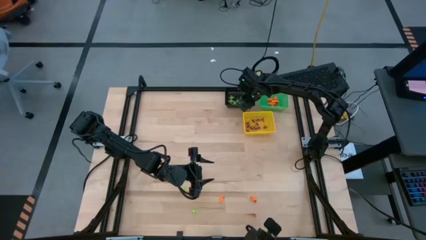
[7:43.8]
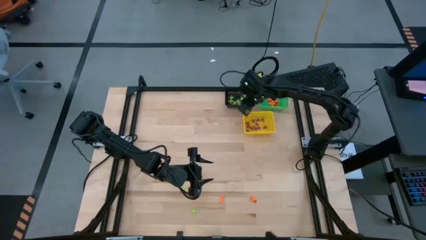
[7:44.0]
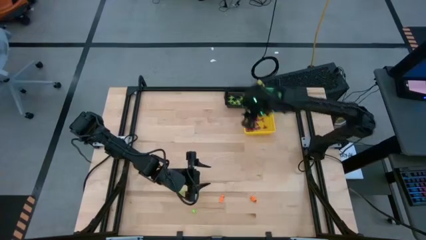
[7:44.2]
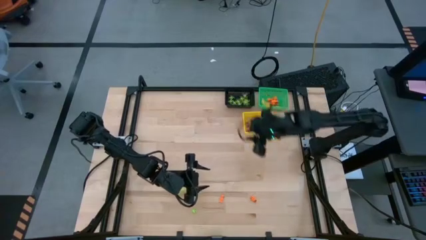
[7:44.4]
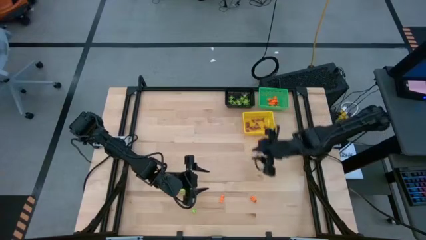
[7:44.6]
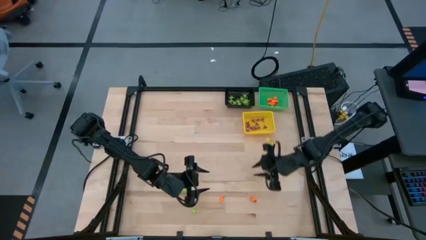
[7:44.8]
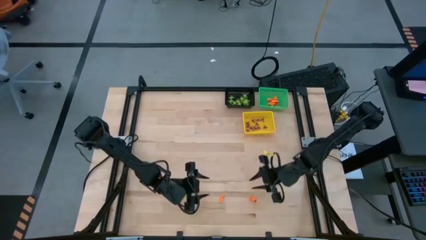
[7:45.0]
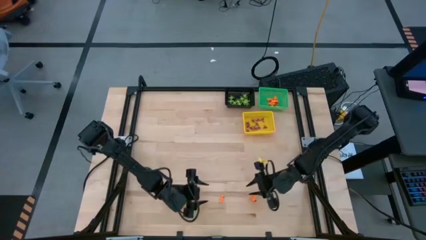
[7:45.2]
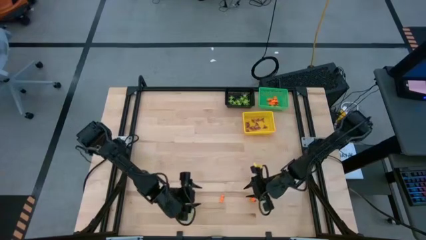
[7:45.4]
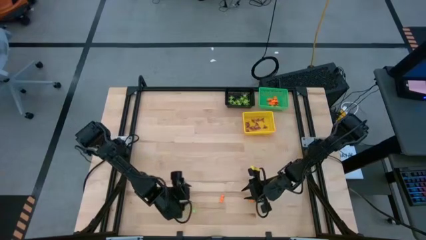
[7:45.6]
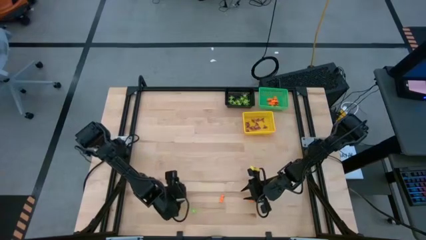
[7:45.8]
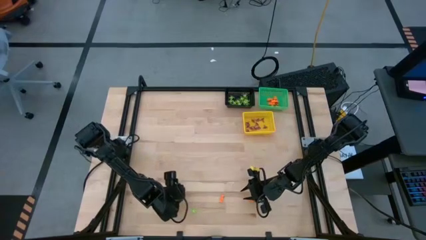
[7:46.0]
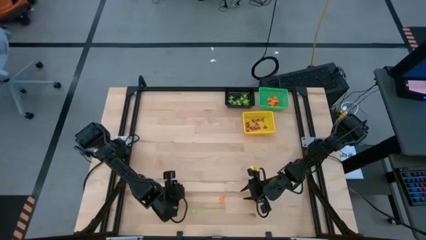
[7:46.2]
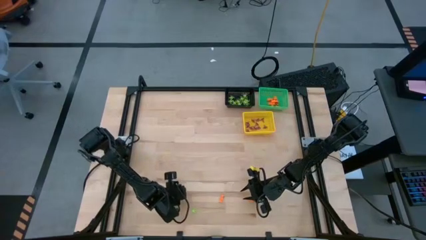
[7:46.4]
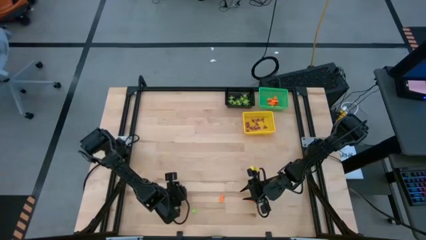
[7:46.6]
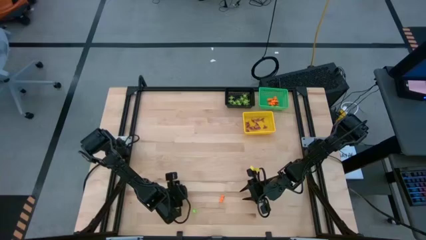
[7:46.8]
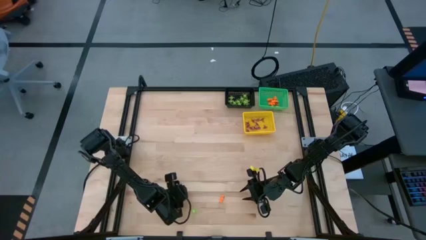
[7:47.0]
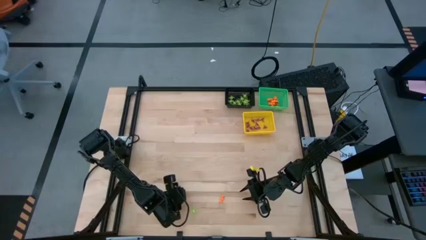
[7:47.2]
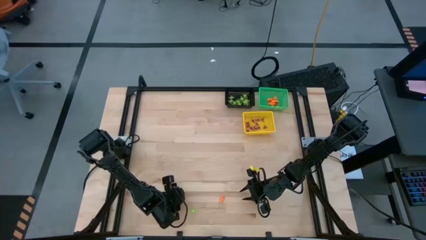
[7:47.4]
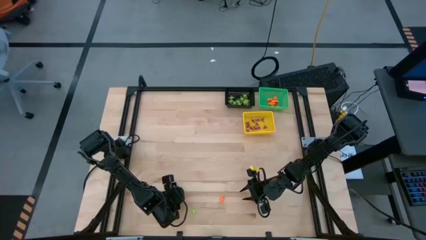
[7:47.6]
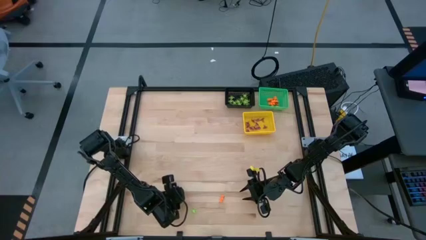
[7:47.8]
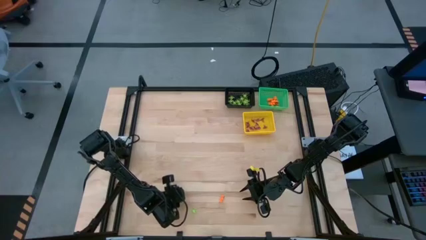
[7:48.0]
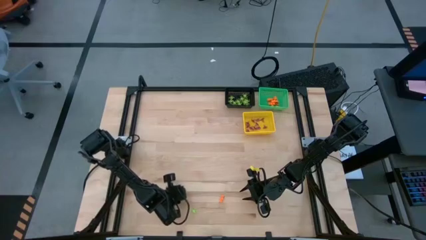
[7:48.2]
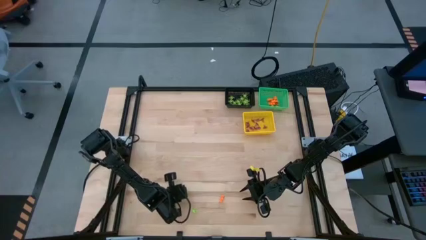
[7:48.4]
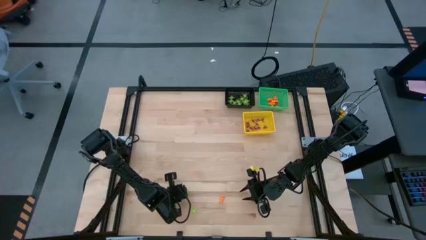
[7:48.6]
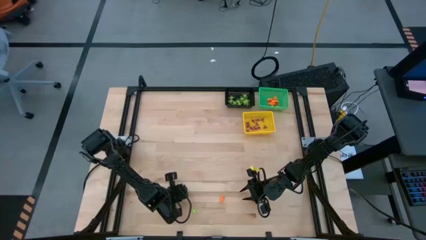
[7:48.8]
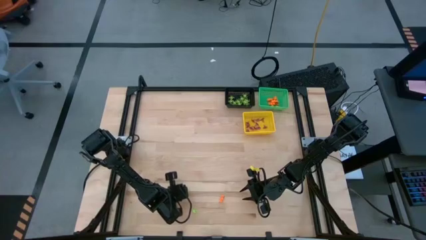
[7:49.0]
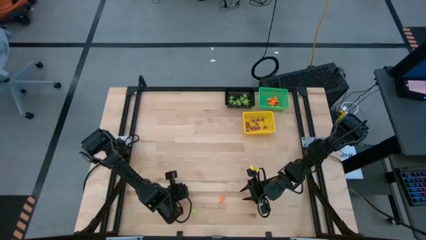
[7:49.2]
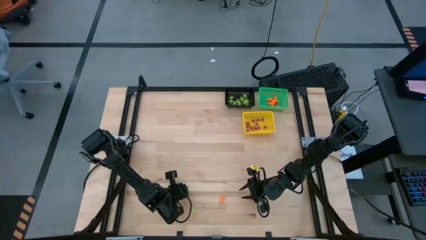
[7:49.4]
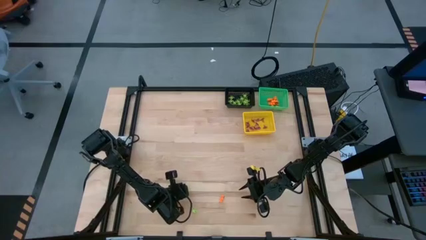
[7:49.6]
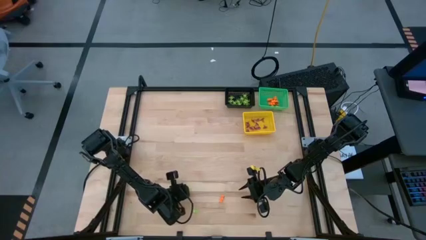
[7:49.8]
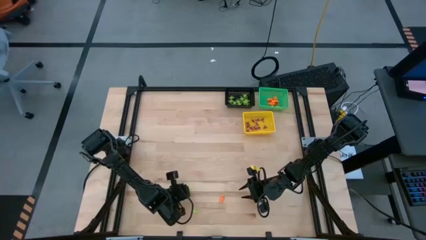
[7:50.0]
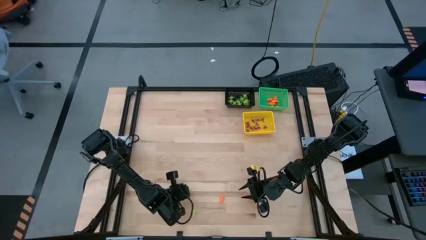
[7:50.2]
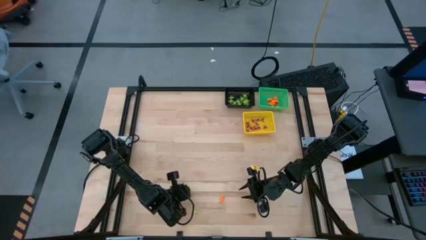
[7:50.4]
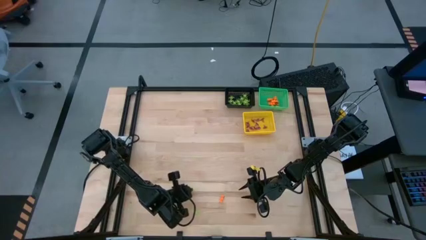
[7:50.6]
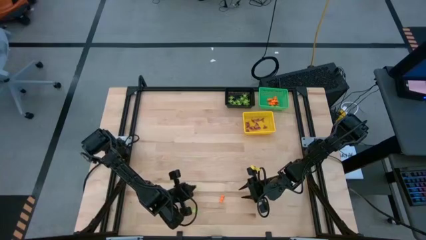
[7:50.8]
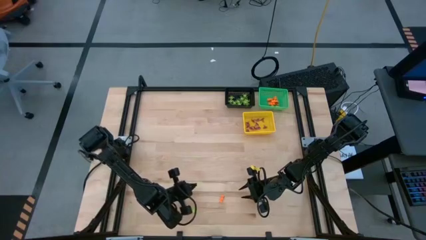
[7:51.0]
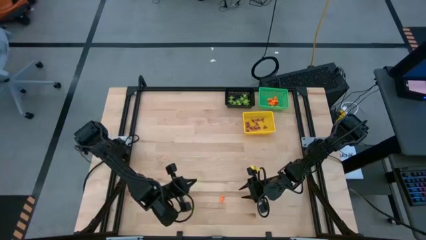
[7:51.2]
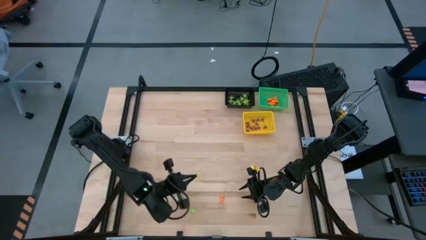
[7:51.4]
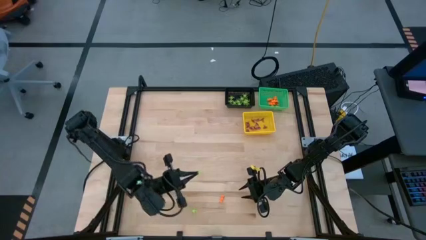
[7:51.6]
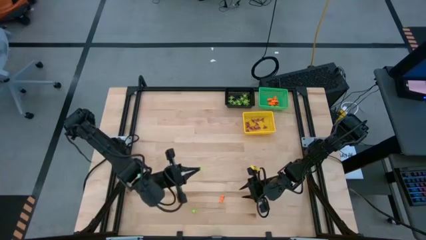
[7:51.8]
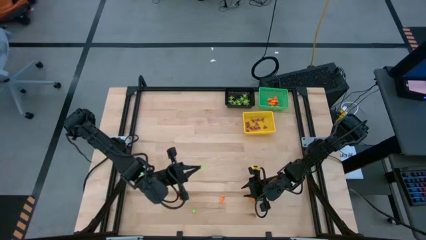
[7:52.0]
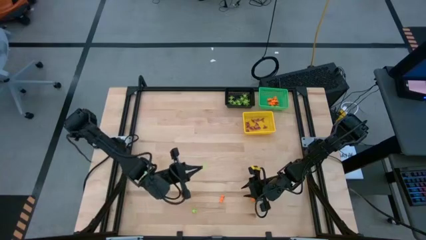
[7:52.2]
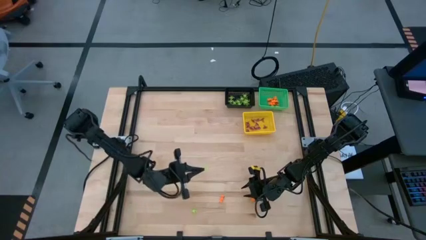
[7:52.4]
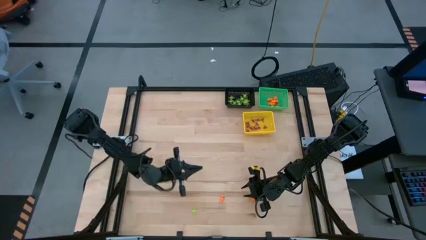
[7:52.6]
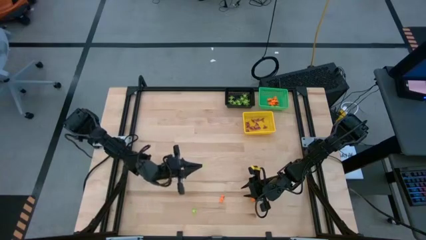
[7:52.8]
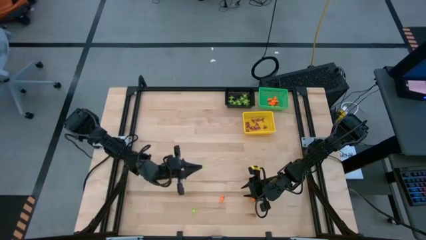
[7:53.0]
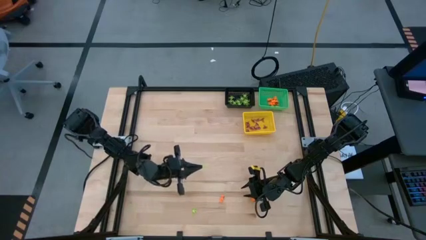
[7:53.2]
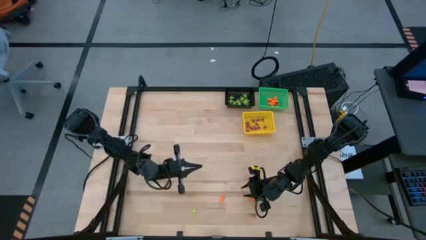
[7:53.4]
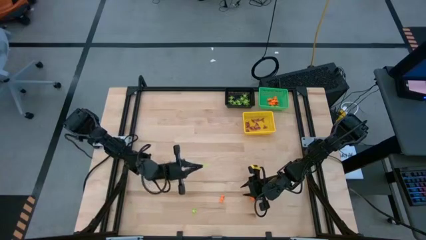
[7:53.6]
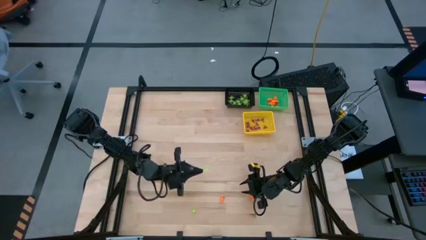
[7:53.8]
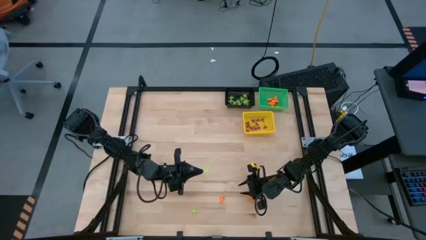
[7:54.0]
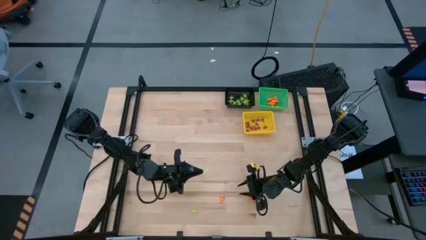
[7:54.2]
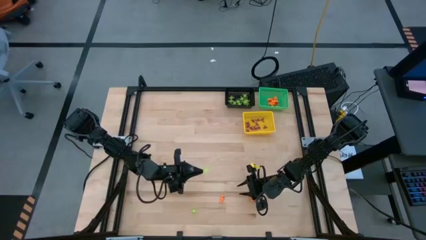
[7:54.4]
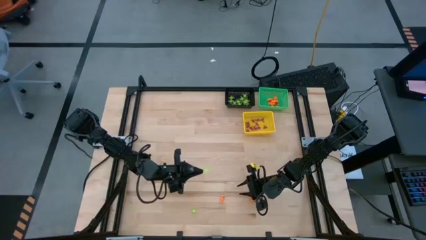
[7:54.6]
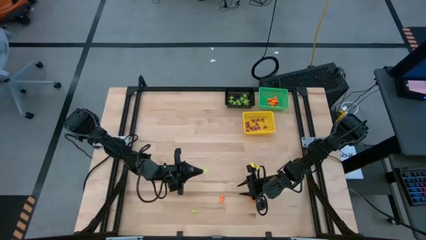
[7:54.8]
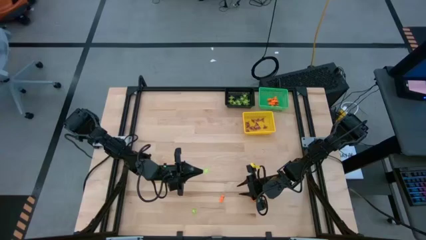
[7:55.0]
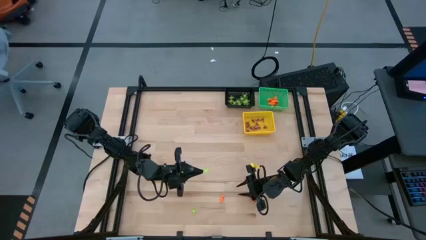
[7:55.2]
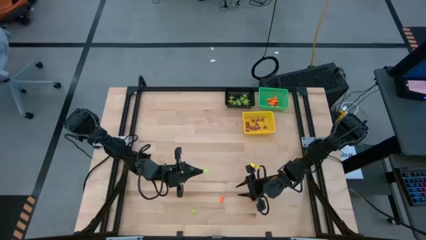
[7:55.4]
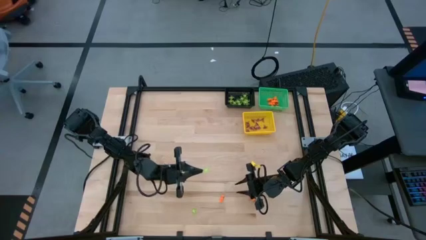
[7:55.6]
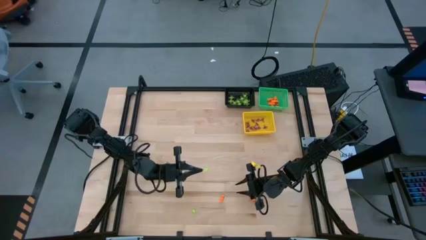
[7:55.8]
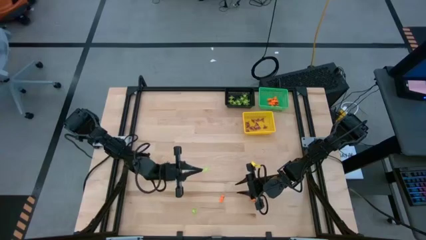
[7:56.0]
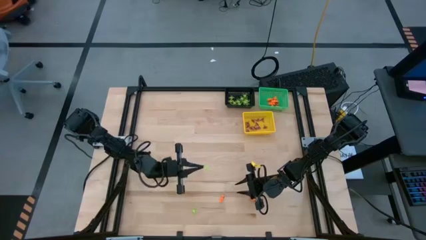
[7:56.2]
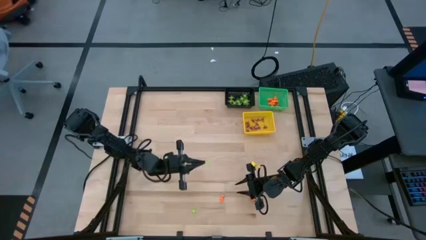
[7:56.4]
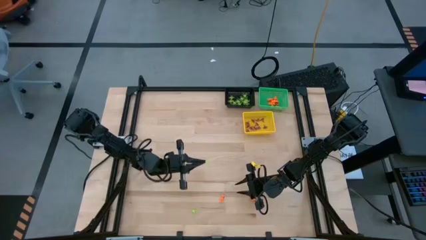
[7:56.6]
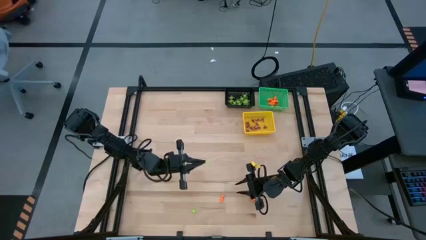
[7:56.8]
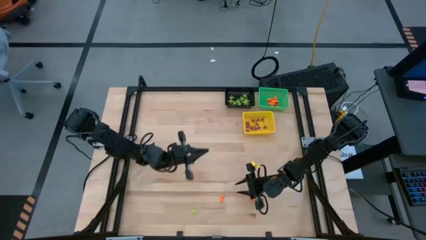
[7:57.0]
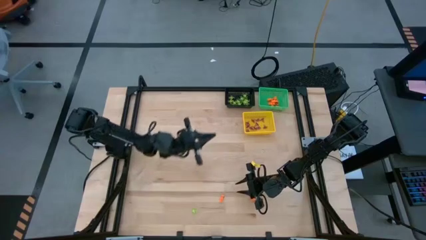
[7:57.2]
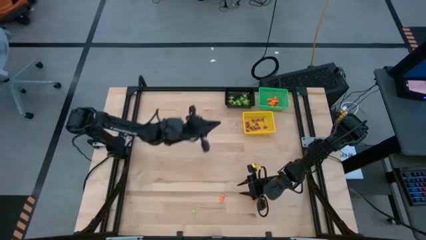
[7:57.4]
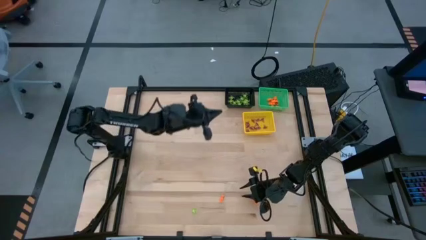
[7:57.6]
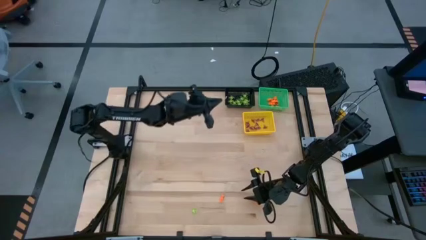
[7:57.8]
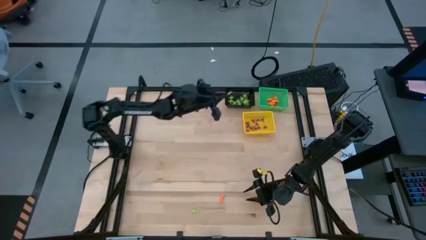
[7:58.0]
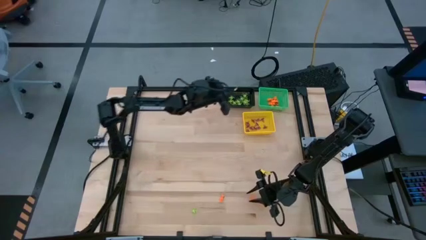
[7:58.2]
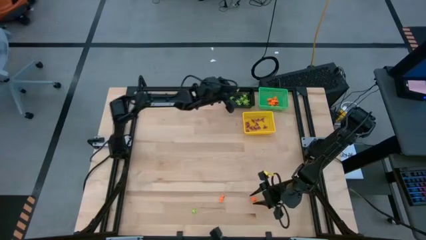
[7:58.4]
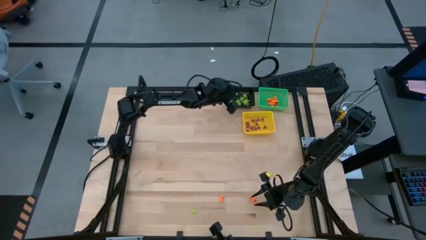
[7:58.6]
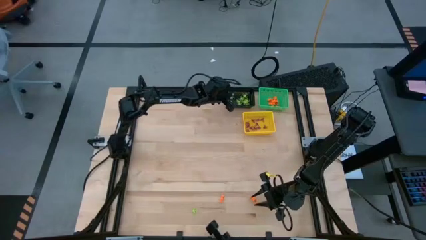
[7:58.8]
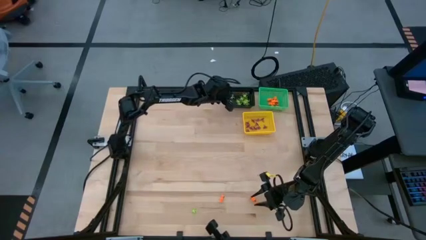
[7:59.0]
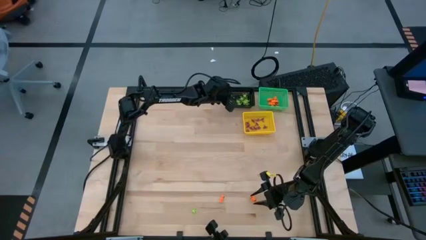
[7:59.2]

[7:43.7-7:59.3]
Task: Sort Halloween decoration
Put the green spider toy into the black basket

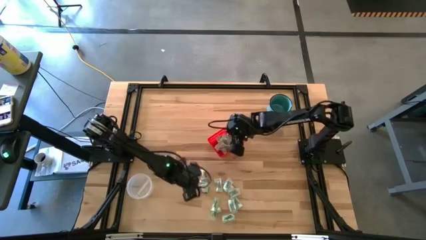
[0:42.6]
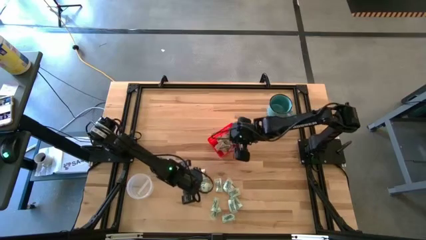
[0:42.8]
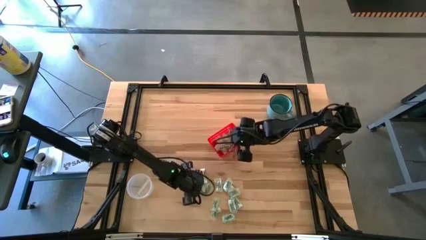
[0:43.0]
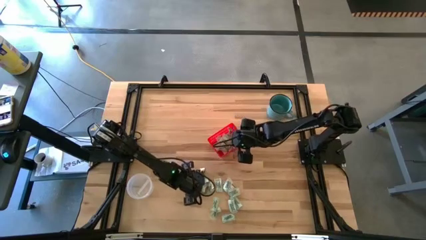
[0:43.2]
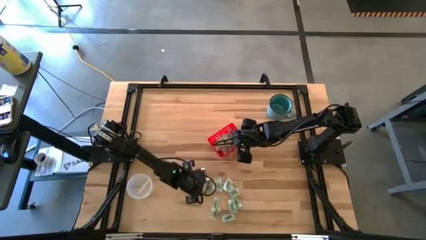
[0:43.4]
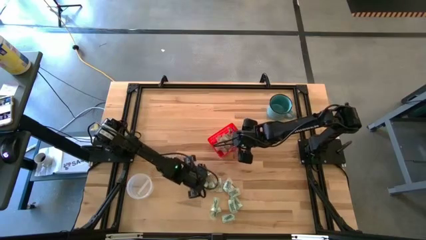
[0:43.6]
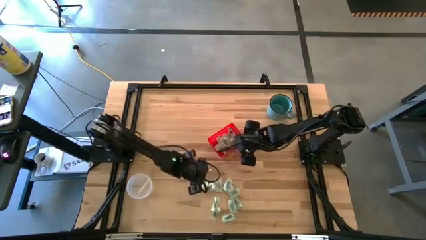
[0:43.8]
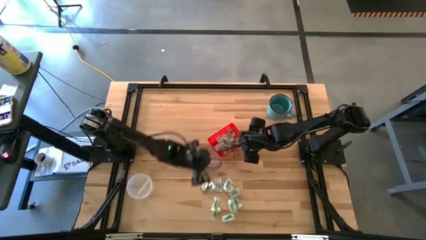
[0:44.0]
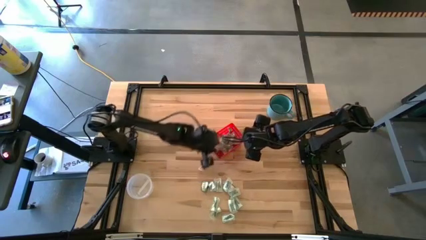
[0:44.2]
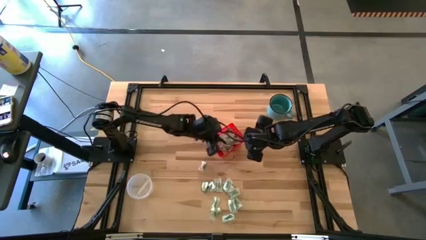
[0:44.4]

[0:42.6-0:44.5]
Task: Pick and place items into bin
Put the stevia packet into the red bin

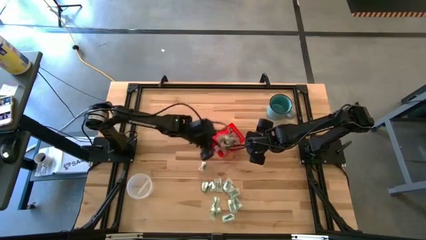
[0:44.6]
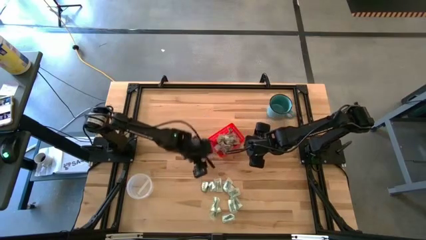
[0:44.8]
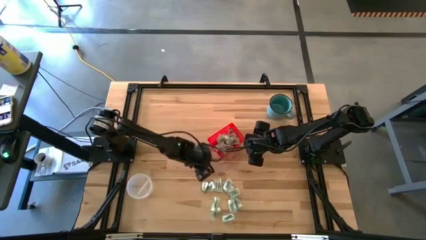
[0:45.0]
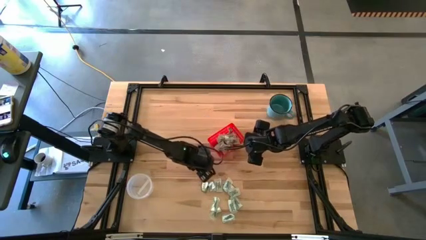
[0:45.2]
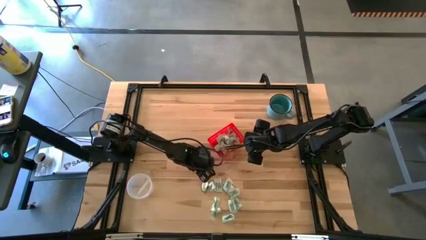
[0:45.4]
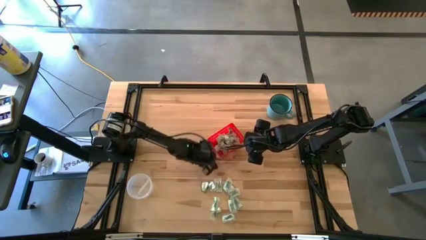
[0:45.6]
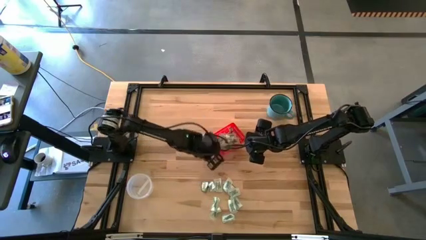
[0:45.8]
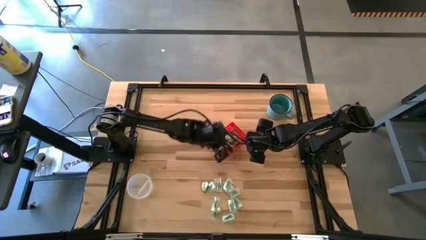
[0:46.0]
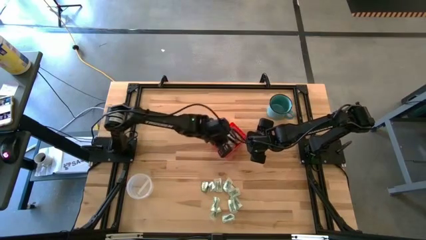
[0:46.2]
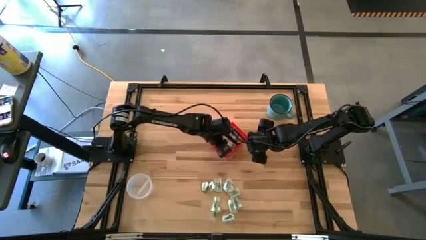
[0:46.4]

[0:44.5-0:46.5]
Put the truvia packet into the red bin
